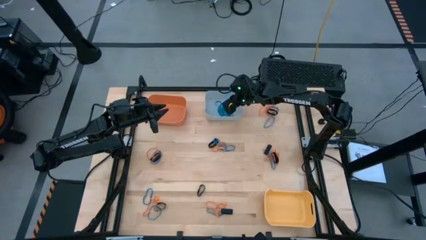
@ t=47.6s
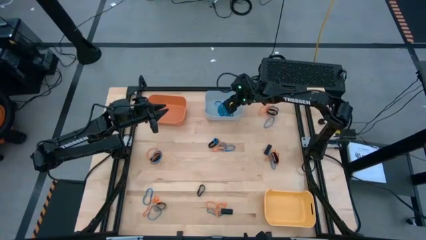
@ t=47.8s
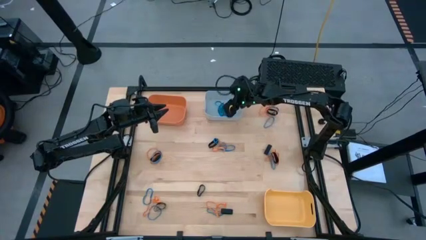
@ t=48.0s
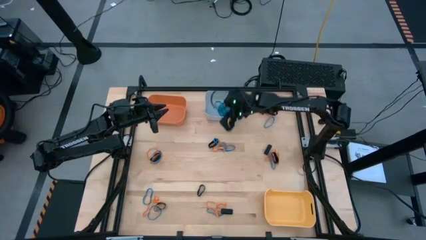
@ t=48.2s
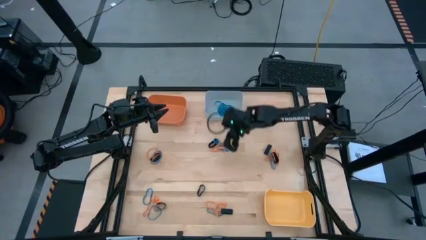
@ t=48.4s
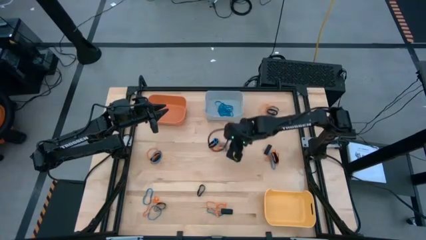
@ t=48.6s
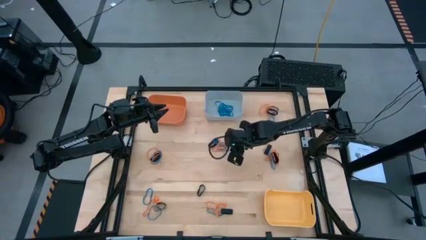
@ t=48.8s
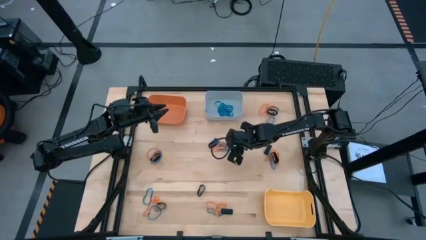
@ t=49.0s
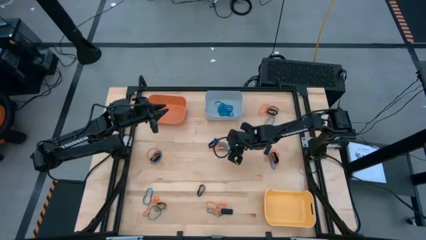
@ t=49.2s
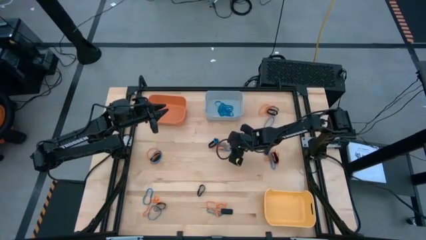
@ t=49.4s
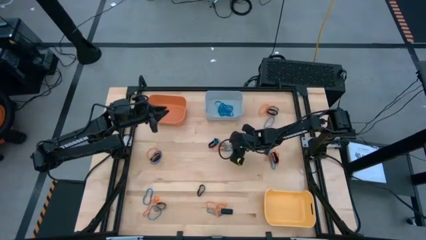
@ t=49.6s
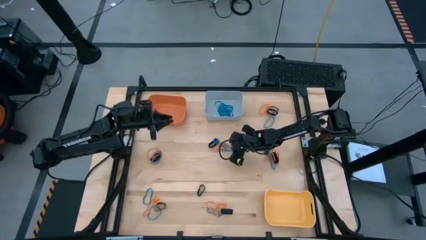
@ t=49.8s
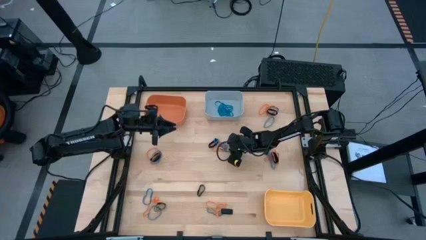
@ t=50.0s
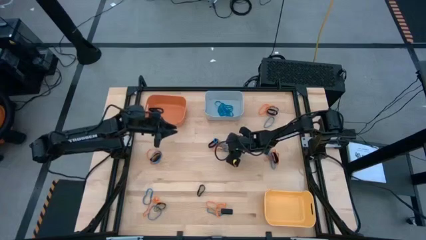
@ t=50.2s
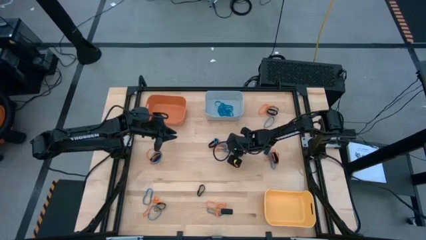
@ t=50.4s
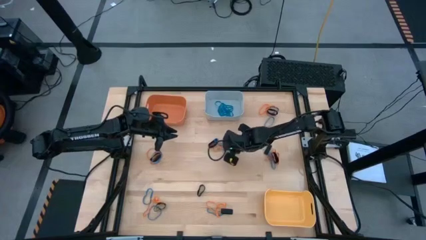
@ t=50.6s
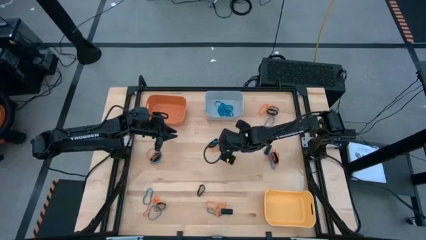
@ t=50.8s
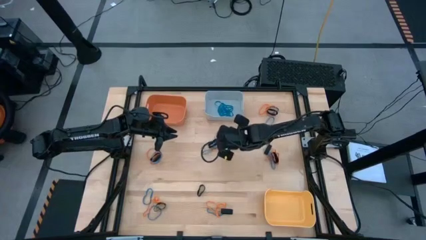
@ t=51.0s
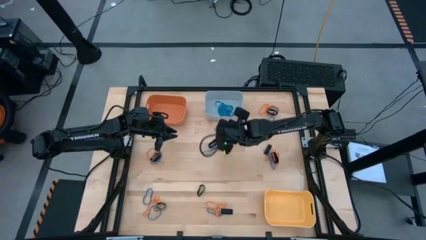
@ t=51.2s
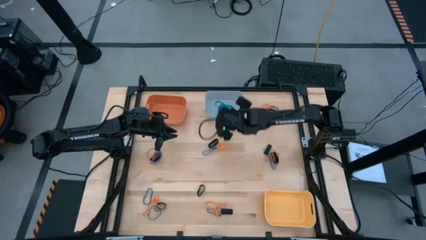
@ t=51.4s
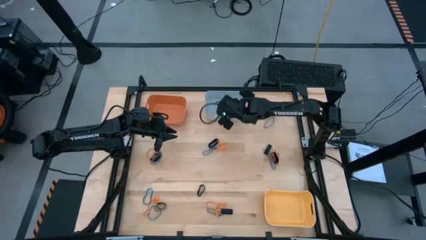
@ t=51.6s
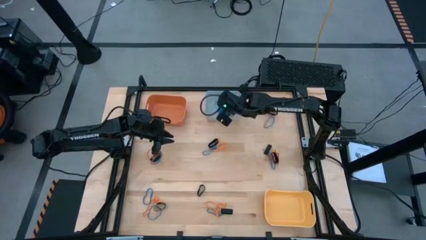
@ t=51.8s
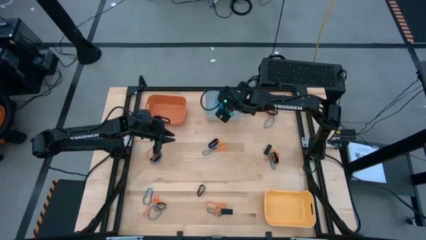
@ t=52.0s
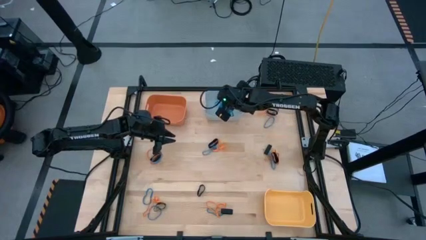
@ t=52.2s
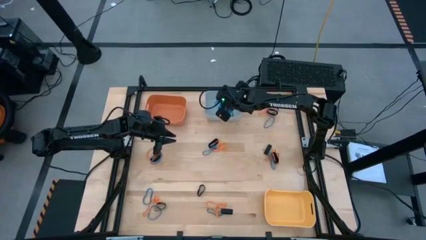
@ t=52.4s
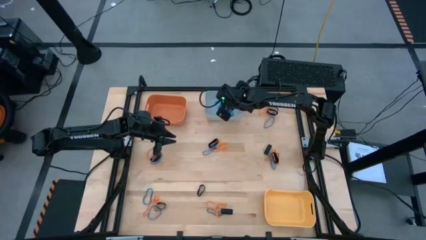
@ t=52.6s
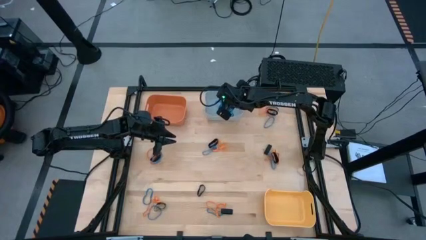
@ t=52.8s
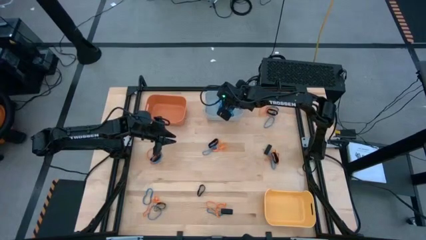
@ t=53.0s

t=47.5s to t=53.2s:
Task: Sort rubber bands into baskets
Put the blue rubberband into the gray bin

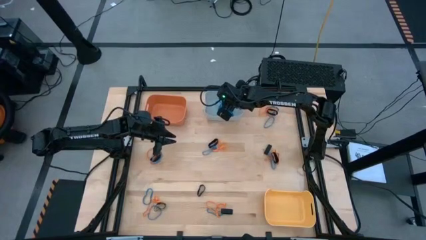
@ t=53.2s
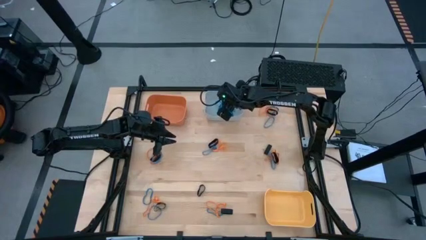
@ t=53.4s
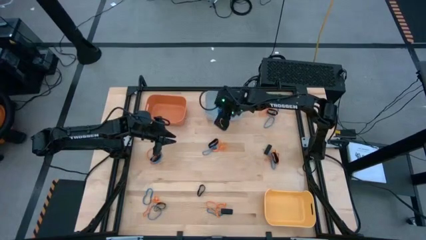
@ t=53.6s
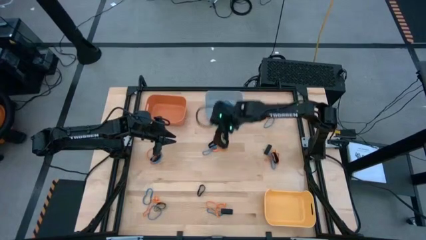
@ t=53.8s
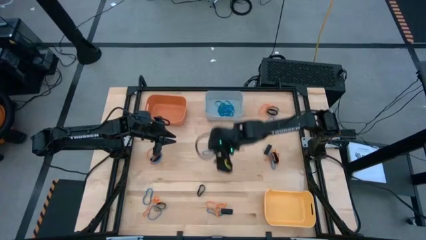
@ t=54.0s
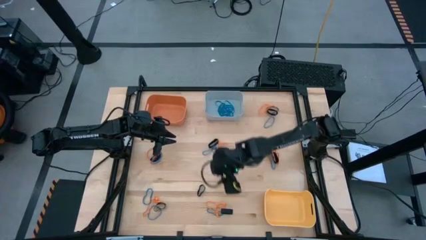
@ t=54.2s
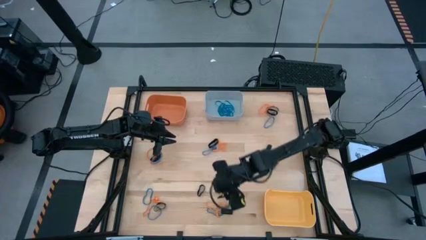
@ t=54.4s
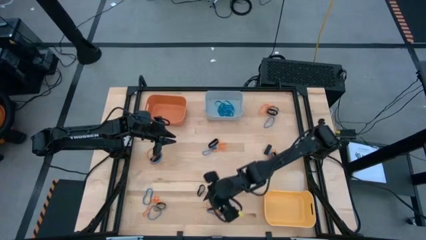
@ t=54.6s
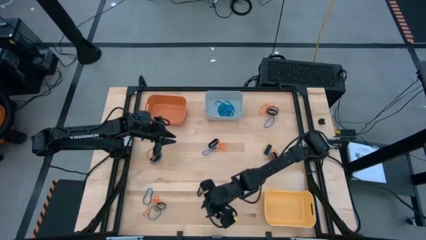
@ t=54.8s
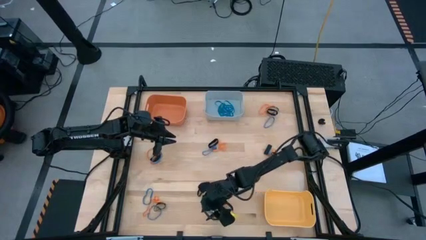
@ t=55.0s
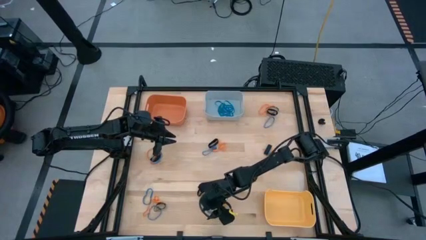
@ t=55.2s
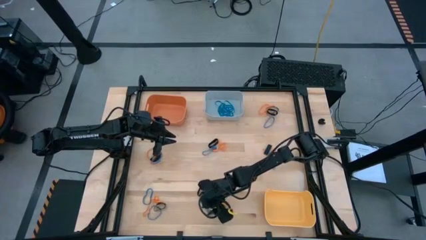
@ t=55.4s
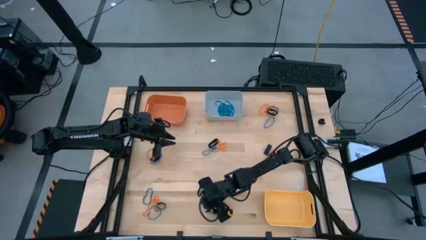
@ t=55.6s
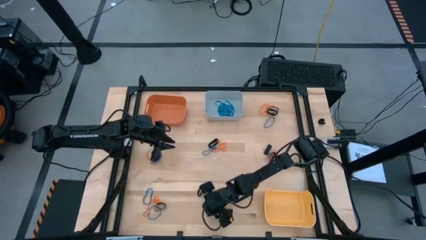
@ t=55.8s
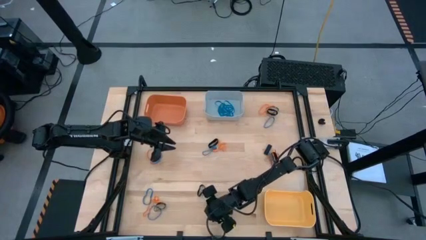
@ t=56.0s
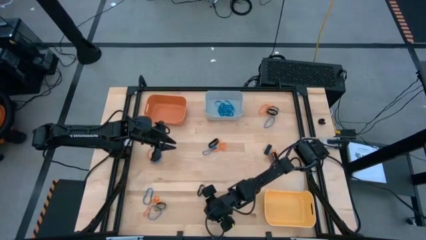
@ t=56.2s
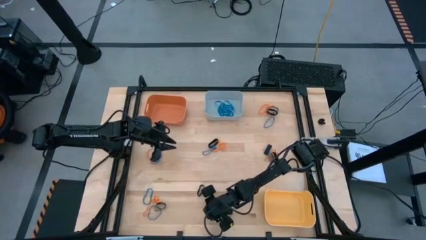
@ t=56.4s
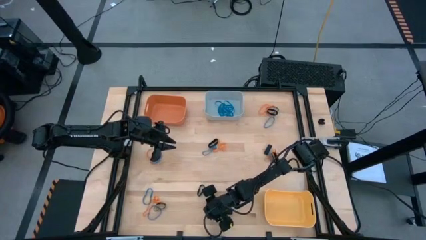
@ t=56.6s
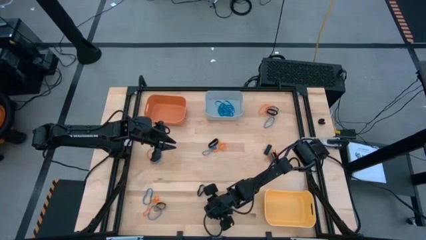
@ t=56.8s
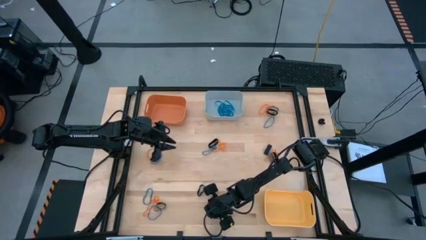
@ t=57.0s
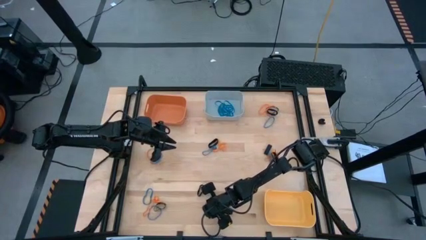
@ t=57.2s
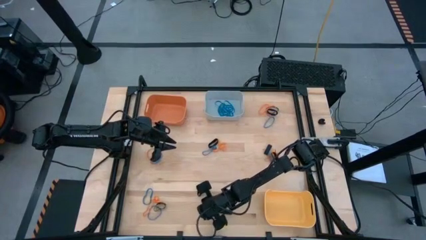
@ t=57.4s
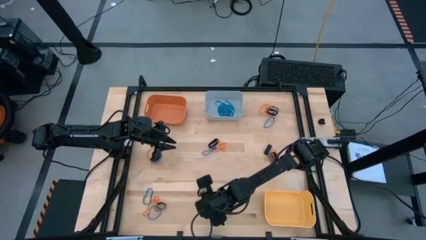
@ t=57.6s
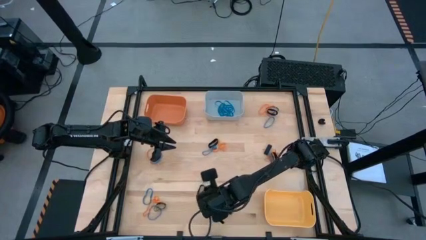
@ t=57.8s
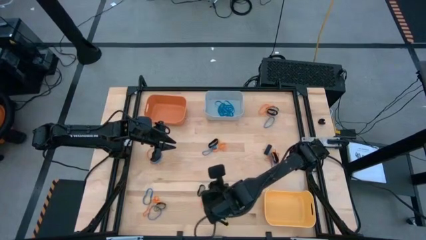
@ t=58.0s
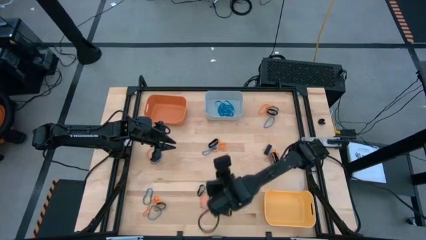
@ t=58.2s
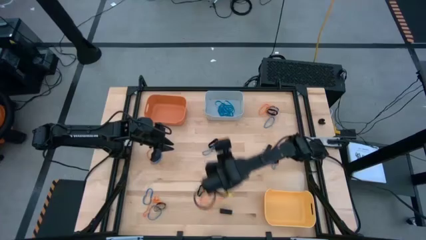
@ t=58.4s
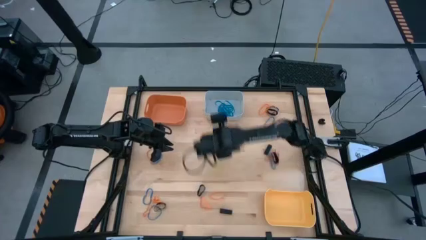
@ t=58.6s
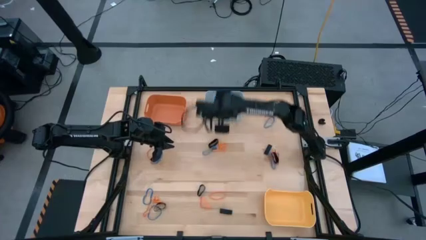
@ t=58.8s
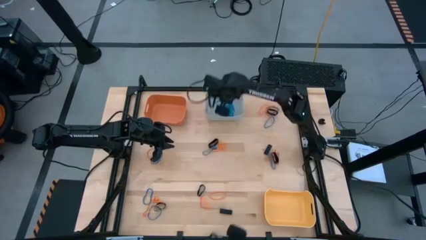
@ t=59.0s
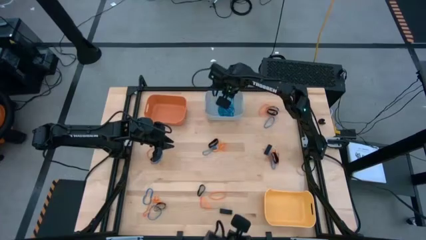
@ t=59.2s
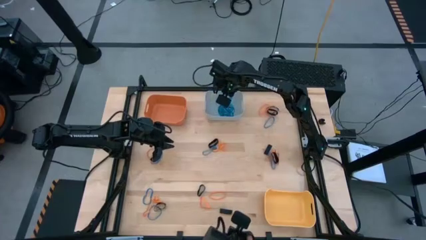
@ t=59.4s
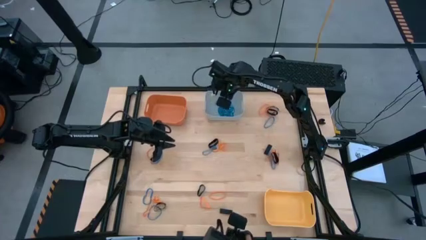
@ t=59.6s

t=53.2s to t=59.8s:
Put the blue rubberband into the gray bin

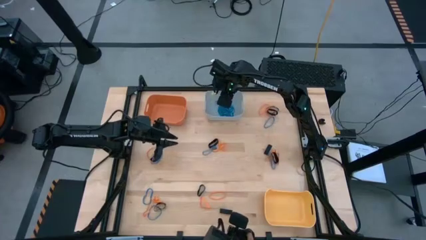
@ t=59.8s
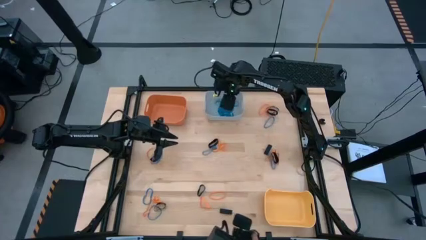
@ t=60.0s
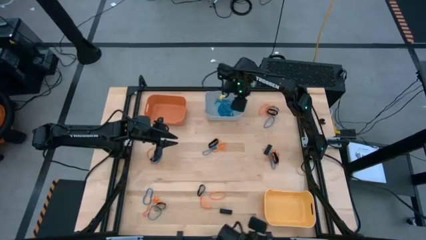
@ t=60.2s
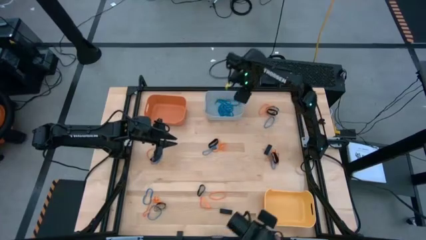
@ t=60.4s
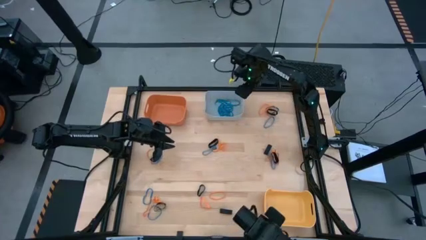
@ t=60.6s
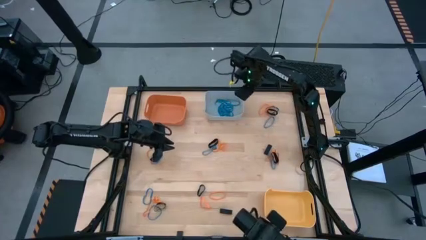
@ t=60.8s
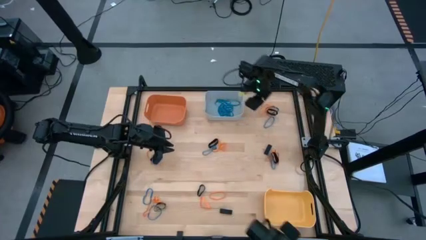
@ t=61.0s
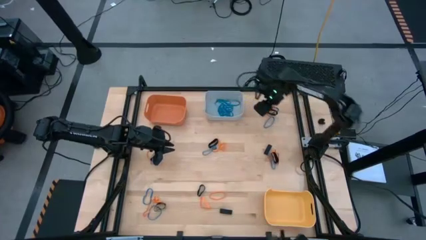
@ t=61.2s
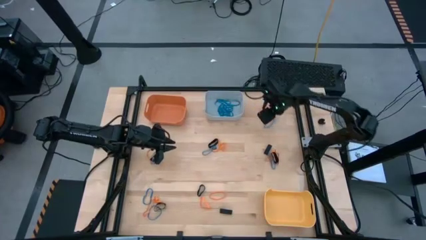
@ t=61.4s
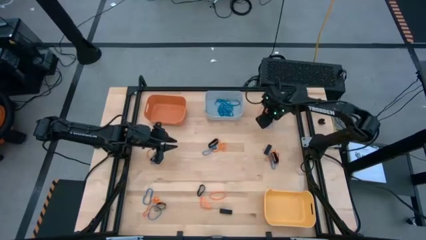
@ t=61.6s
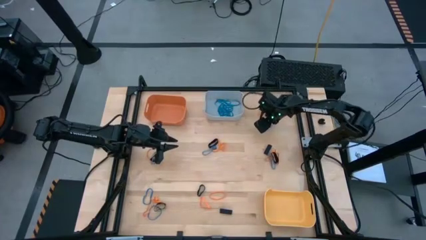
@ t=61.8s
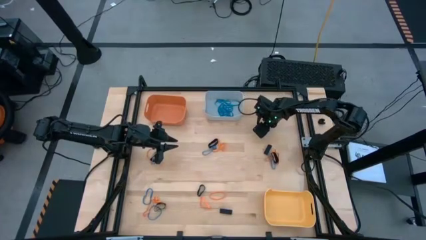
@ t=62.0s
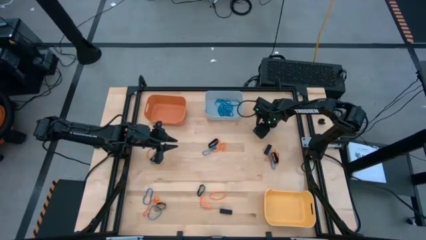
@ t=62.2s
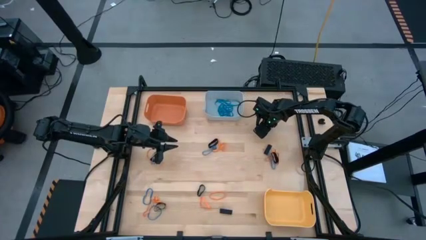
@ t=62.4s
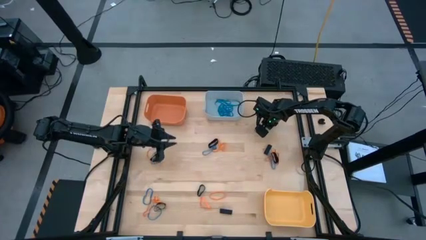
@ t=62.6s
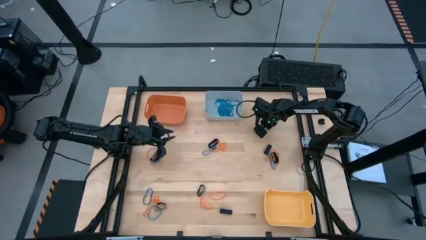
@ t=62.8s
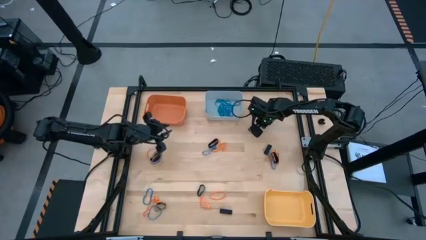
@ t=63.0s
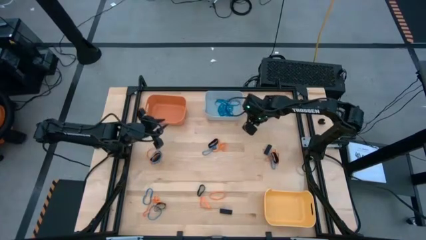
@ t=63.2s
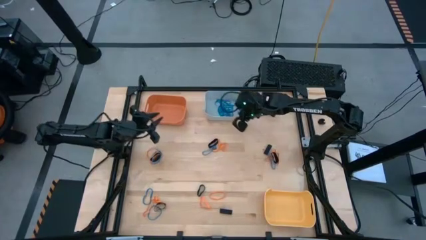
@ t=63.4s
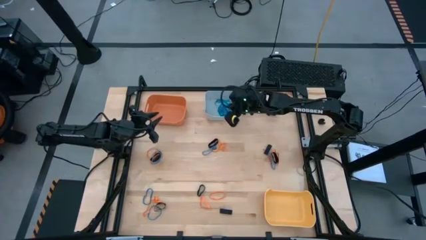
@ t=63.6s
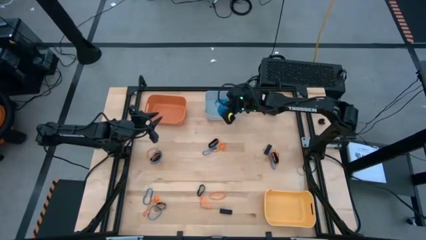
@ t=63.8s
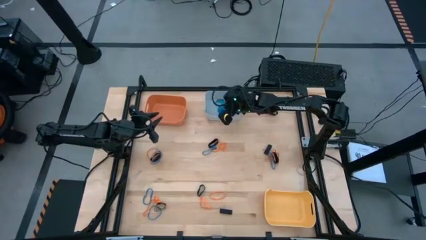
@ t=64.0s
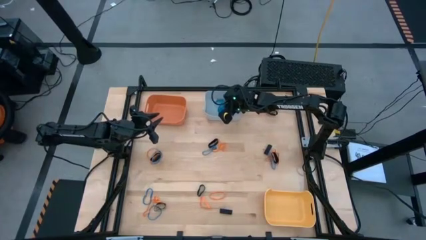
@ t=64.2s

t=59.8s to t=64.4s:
Put the blue rubberband into the gray bin
